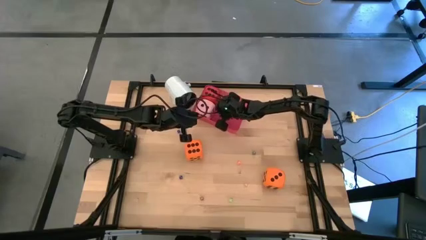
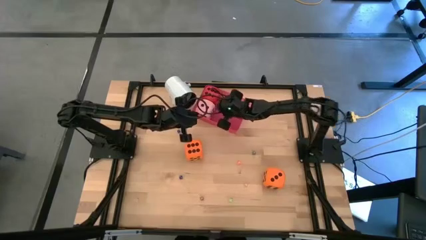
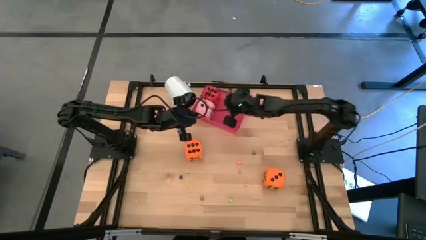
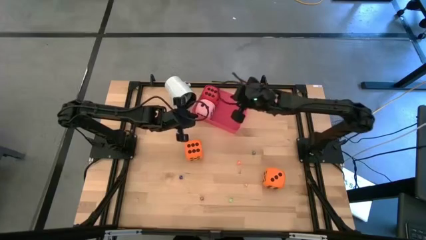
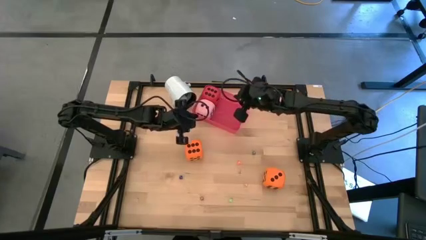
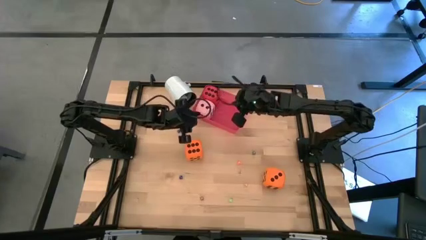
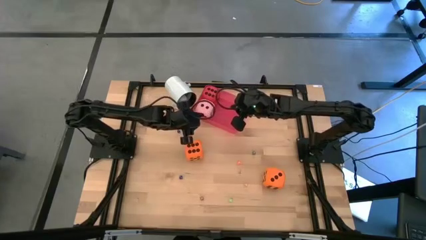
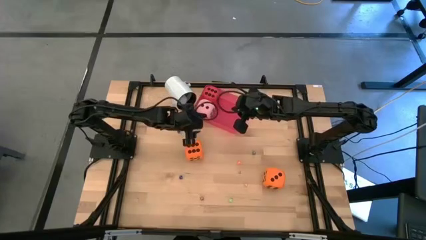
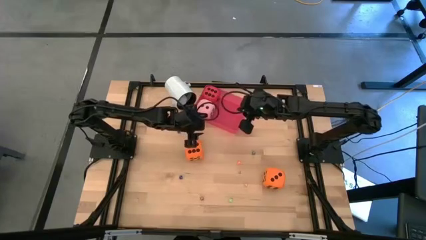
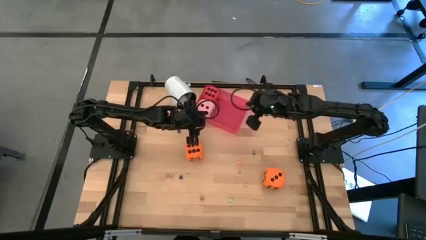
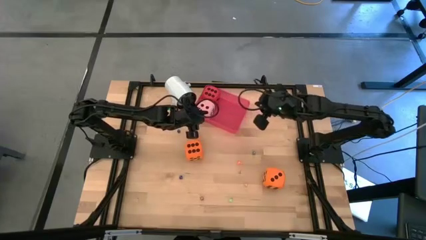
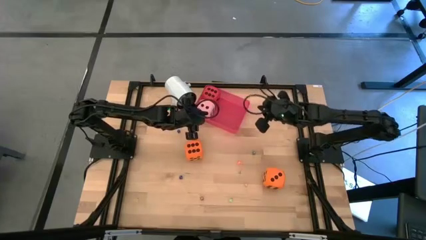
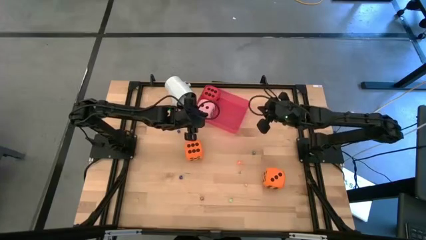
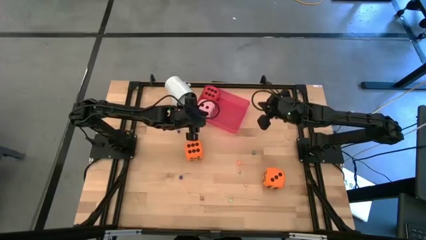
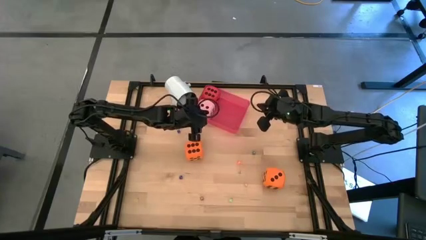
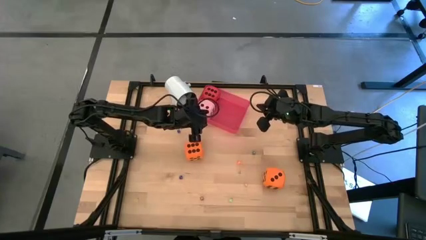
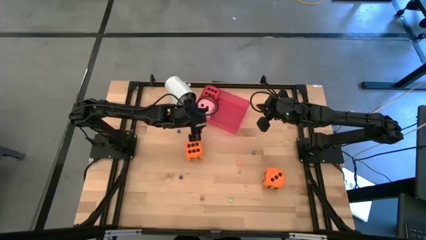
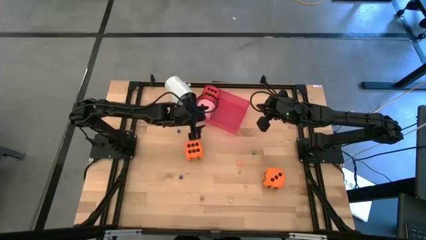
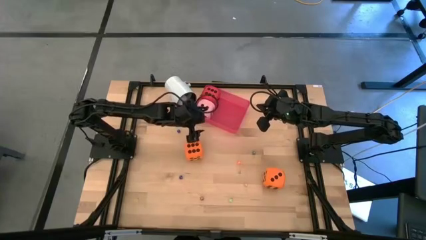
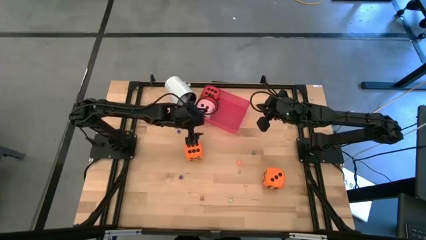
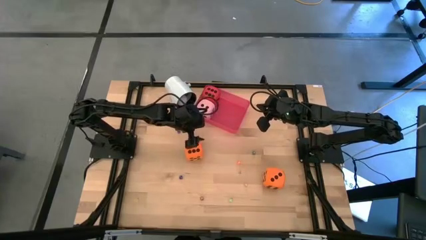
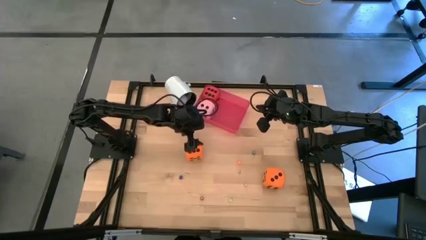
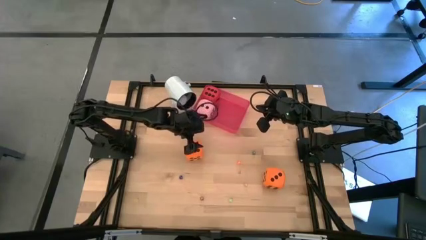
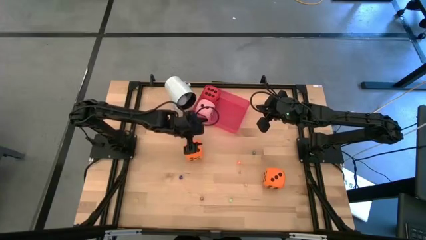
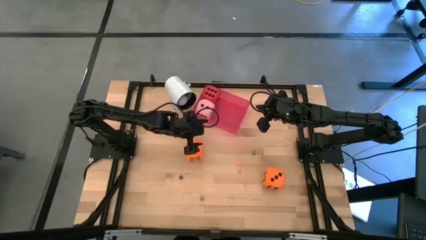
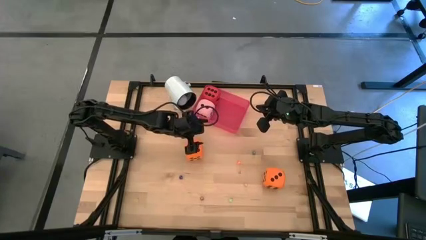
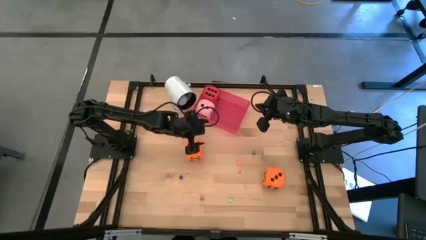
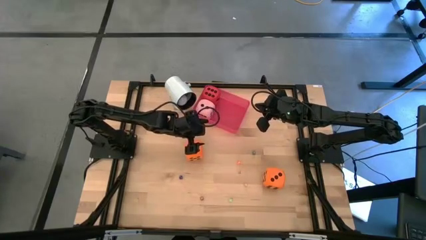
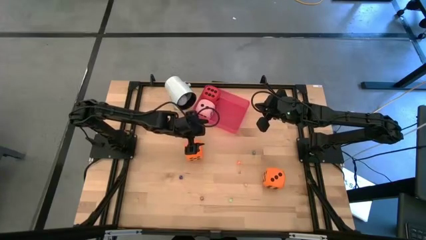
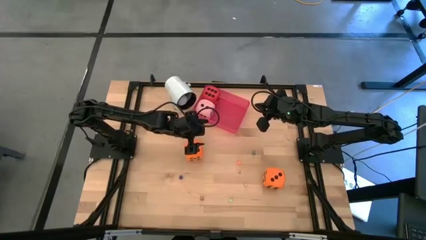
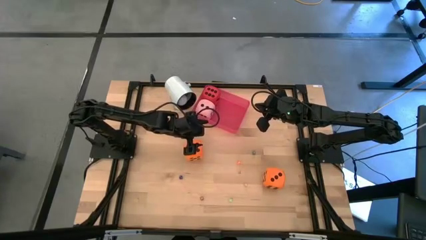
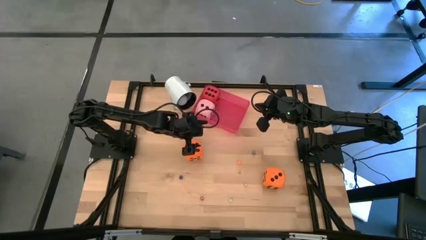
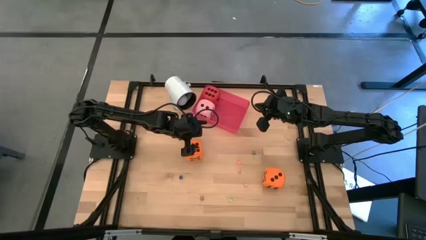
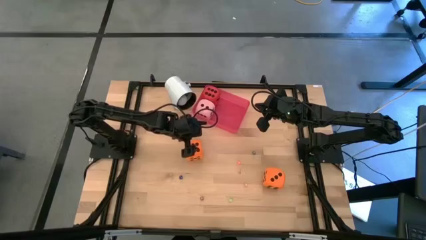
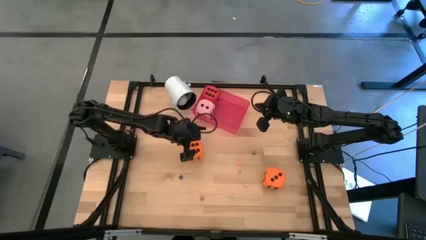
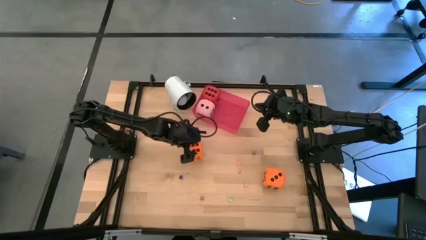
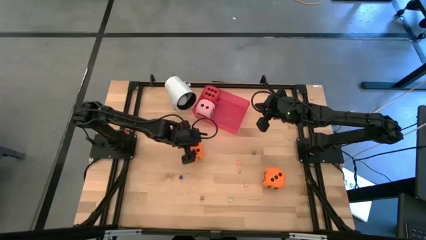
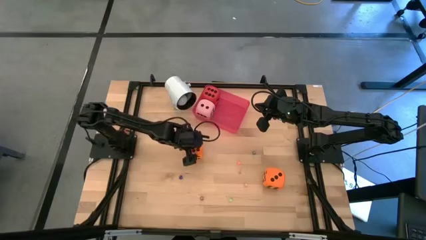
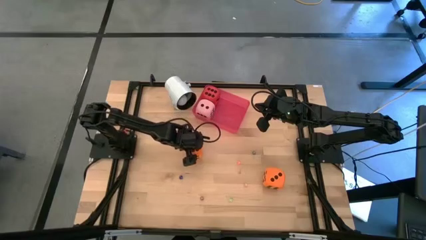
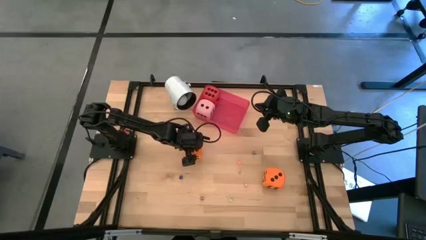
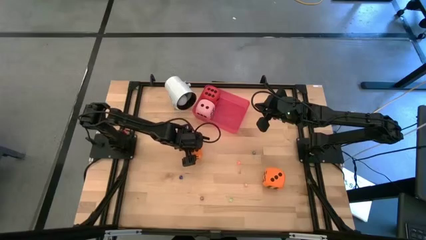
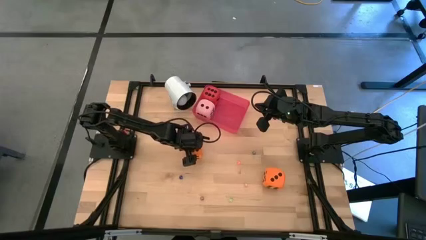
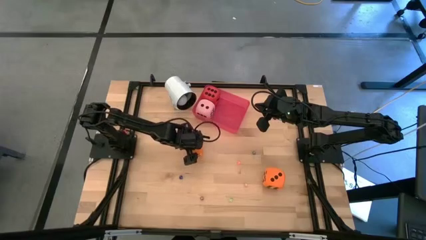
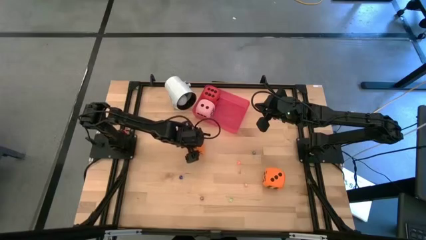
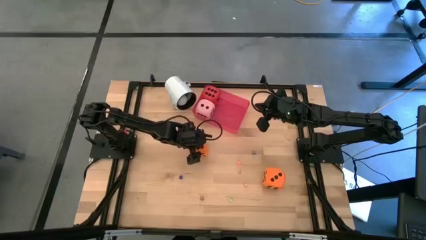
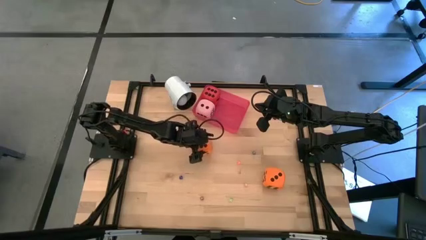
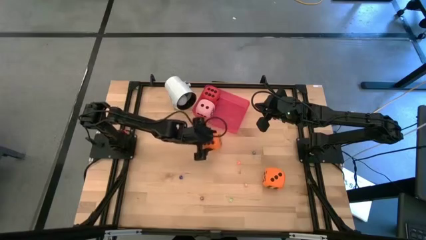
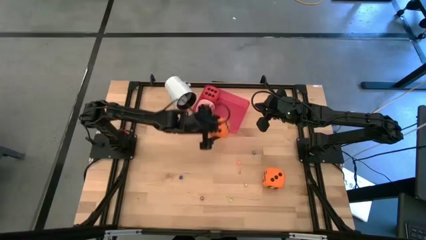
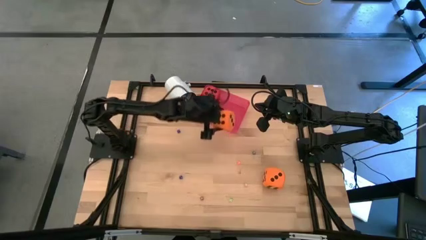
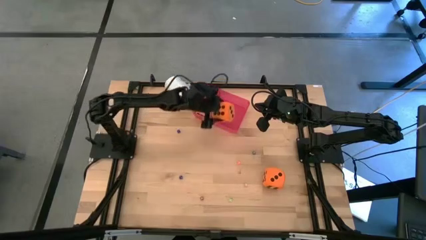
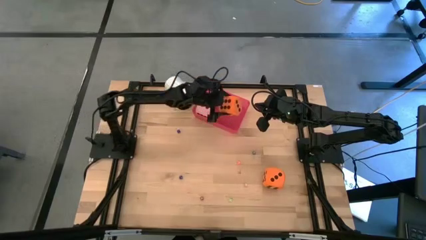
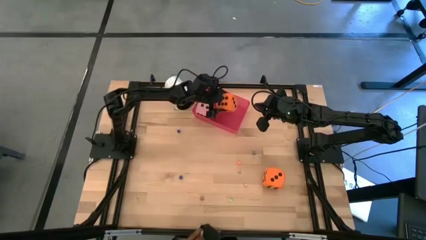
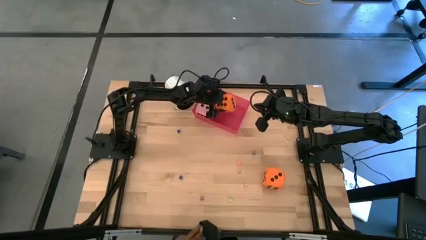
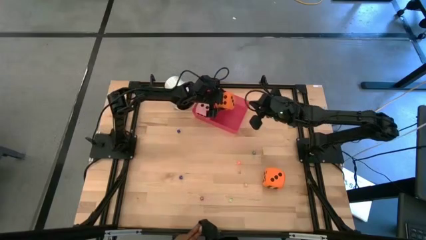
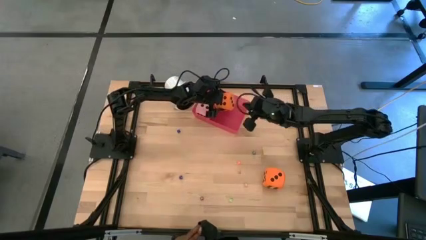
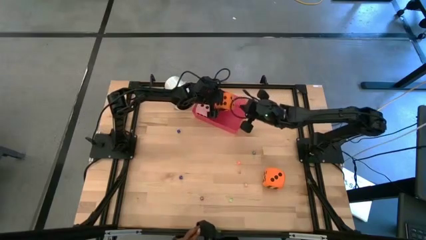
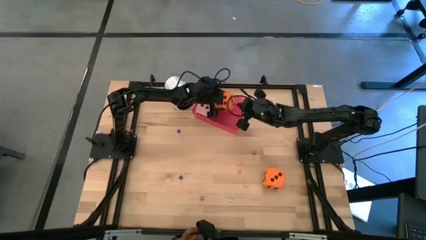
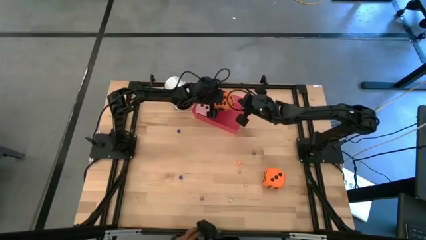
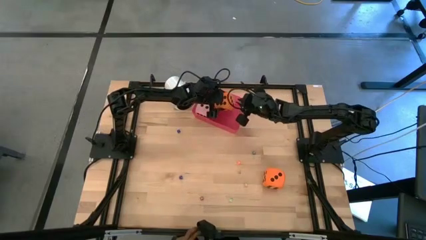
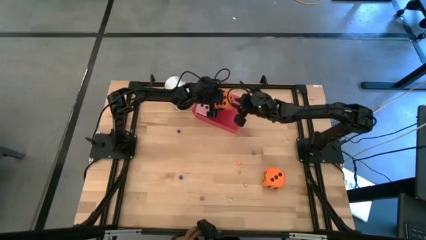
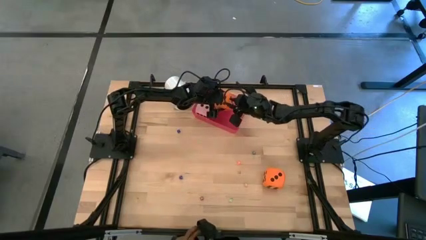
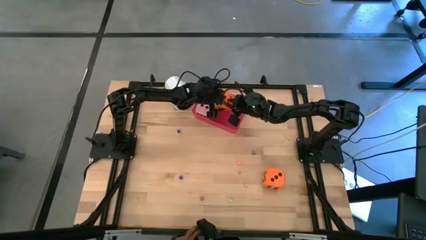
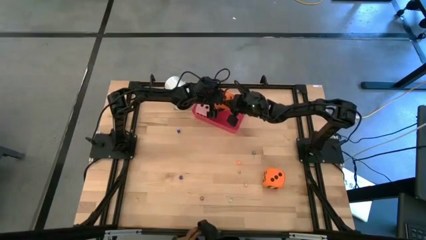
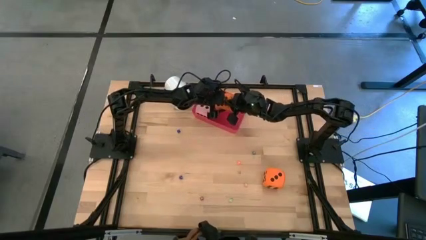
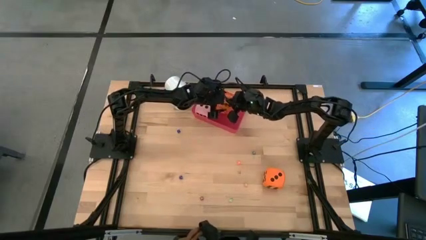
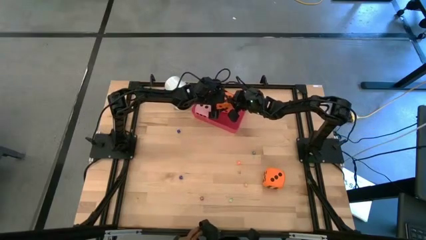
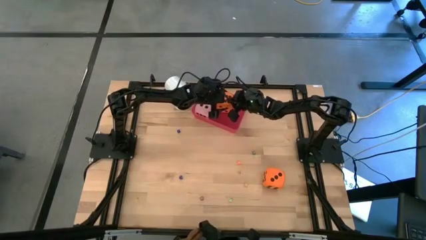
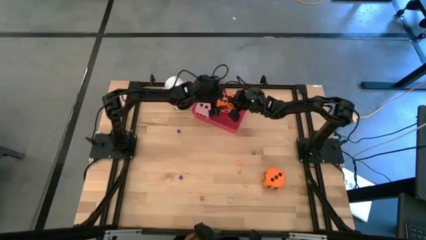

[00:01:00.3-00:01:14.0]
Task: Pick & Place Dice
Put the left big orange die into the red bin

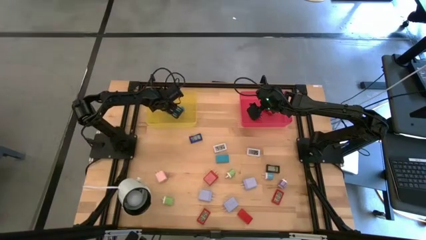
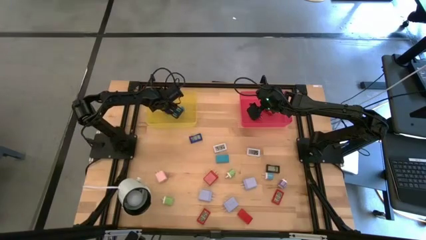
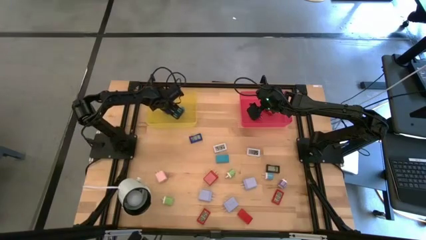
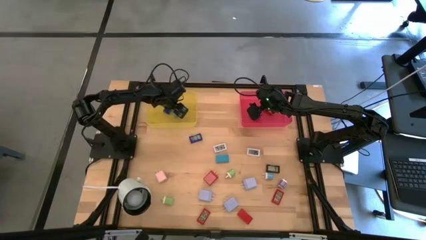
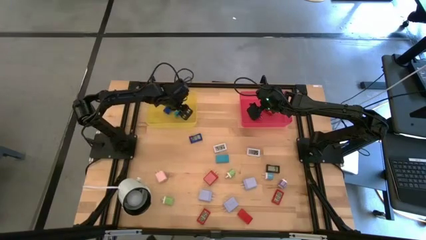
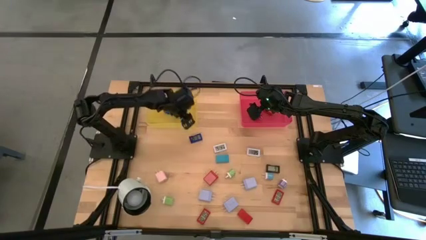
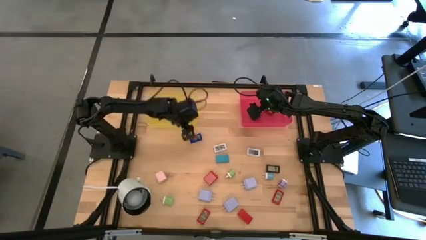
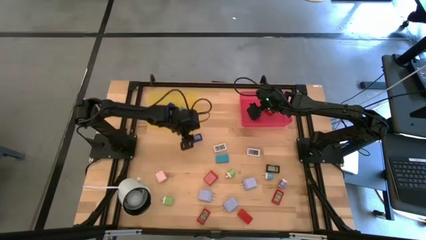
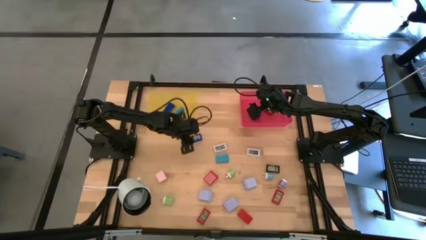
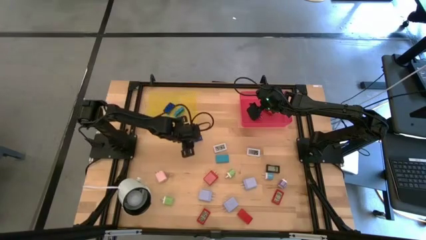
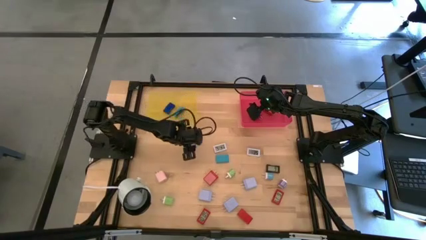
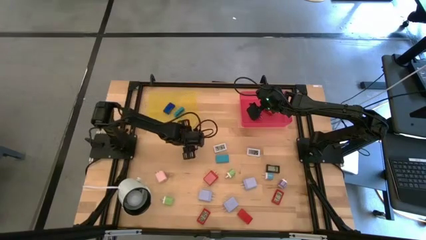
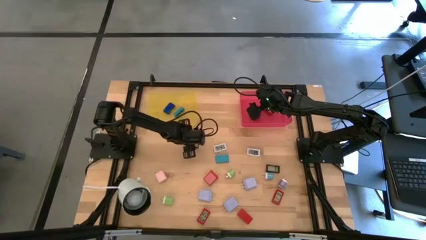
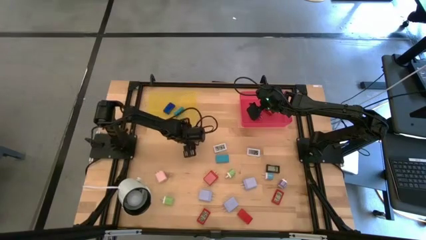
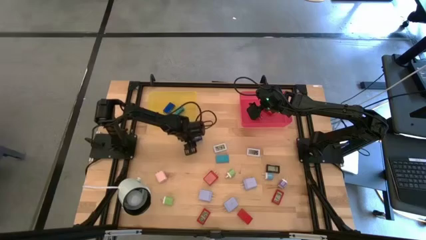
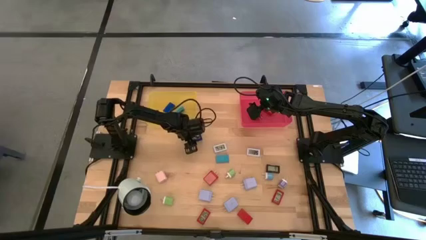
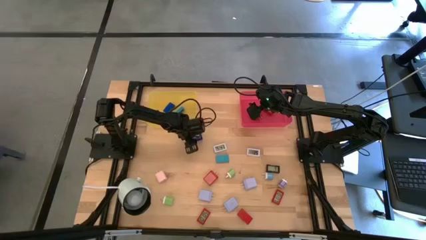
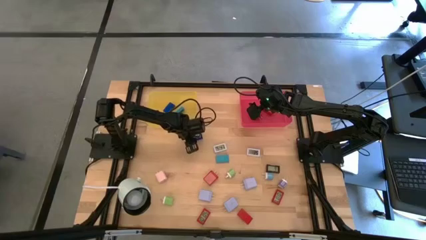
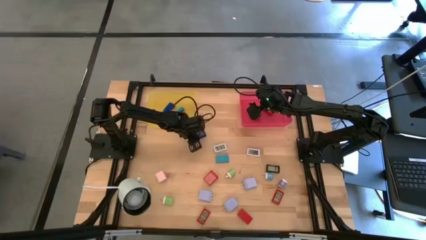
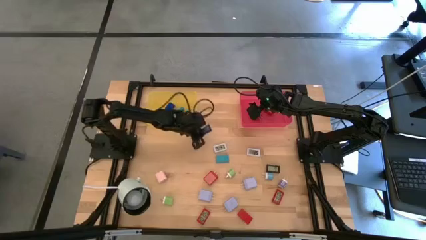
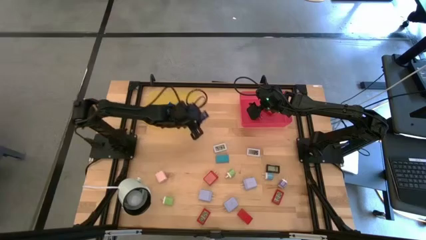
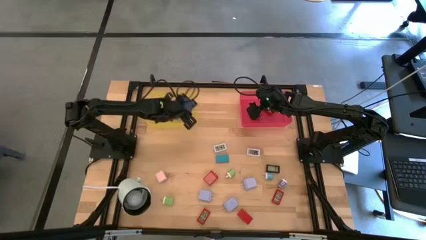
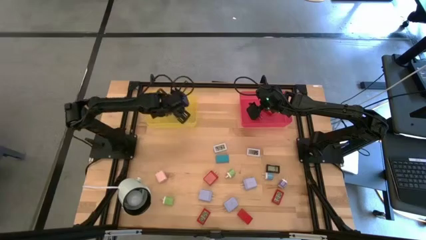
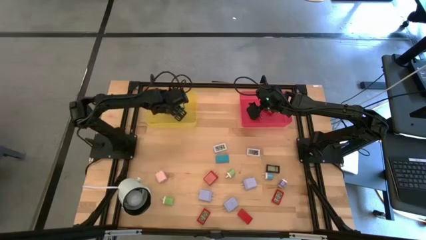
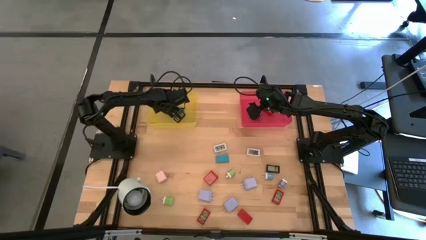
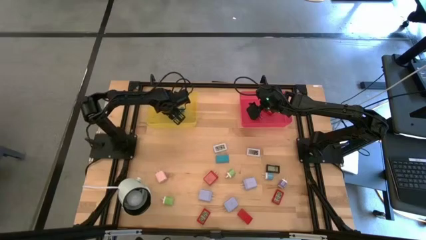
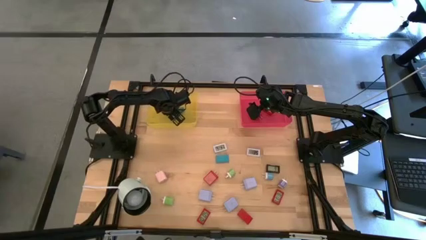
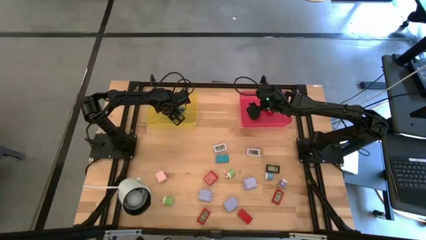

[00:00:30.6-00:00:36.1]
Task: Pick & Place Office items
Put the blue digital clock into the yellow bin
